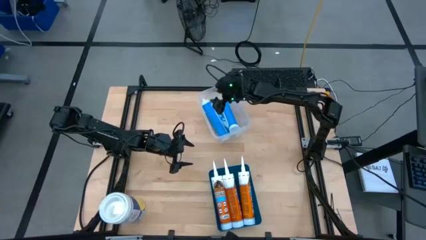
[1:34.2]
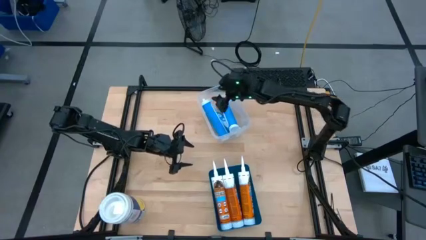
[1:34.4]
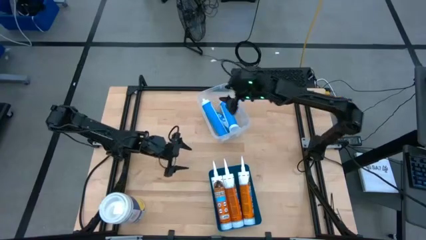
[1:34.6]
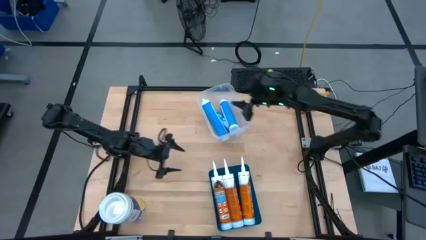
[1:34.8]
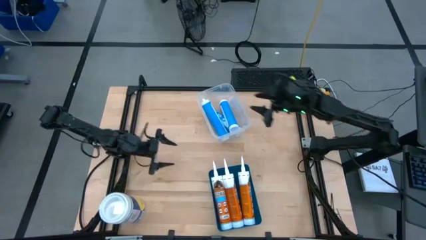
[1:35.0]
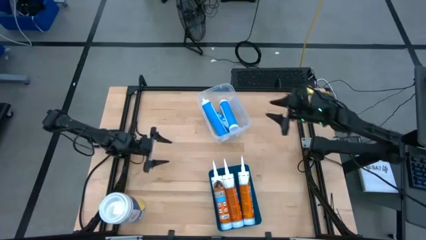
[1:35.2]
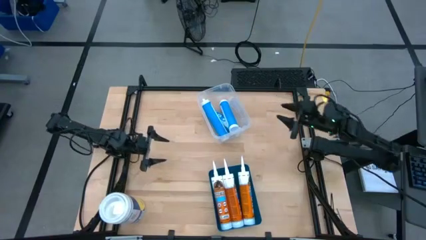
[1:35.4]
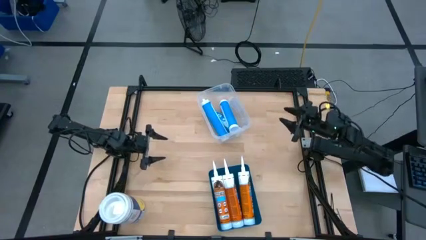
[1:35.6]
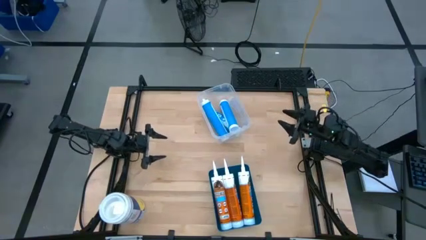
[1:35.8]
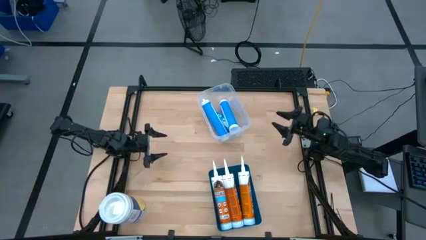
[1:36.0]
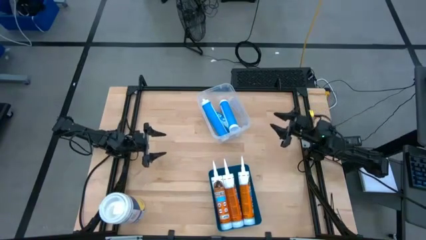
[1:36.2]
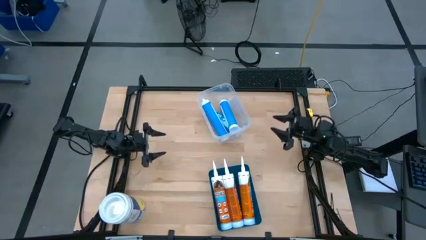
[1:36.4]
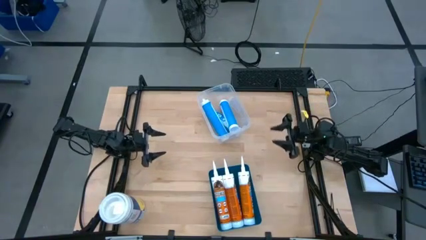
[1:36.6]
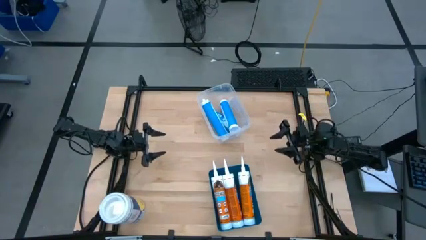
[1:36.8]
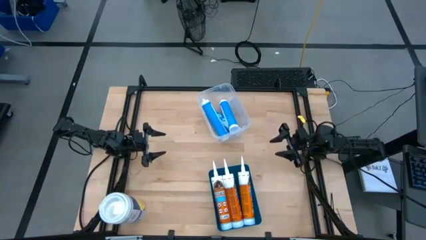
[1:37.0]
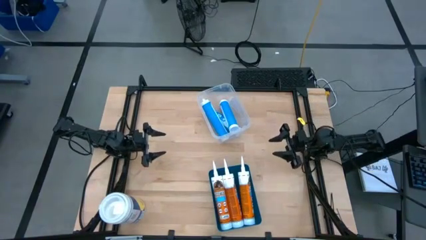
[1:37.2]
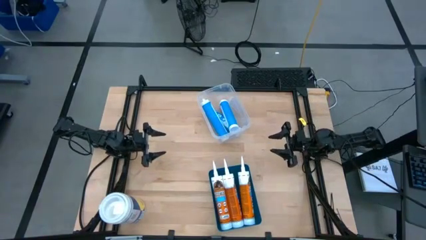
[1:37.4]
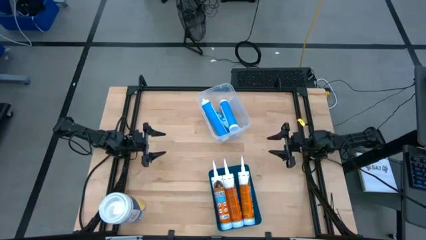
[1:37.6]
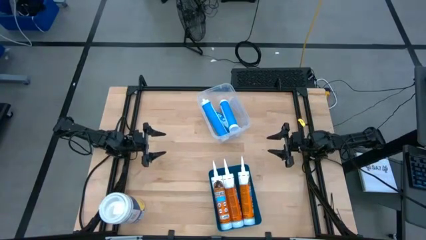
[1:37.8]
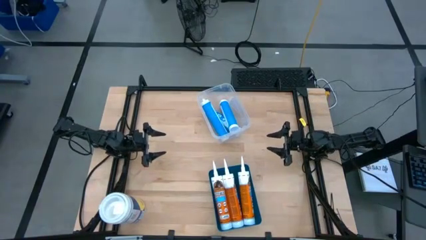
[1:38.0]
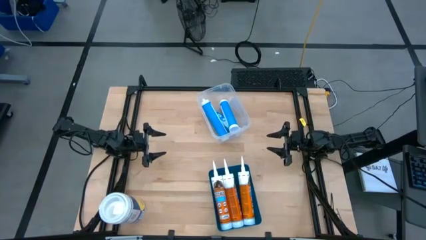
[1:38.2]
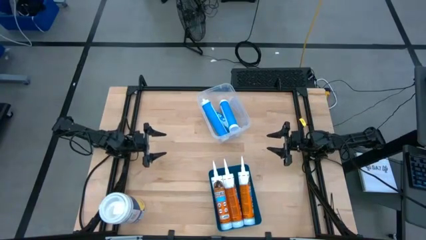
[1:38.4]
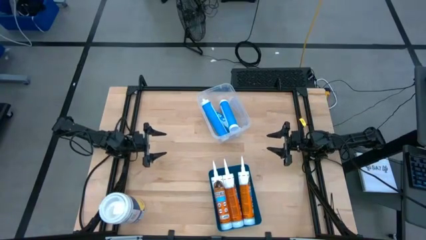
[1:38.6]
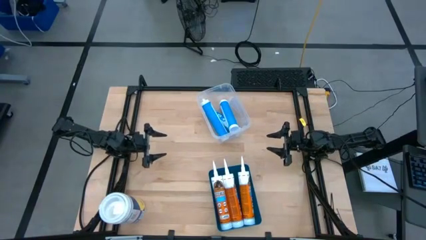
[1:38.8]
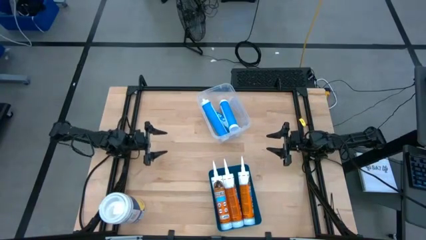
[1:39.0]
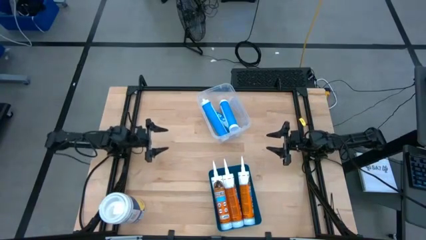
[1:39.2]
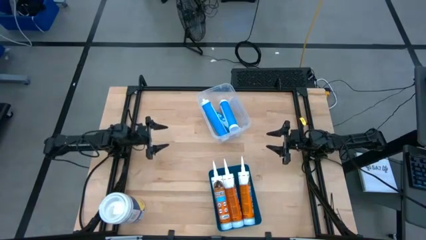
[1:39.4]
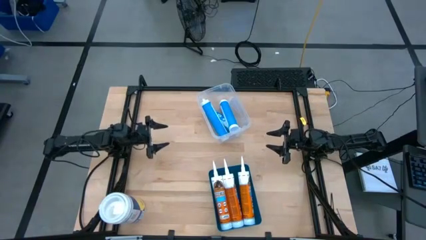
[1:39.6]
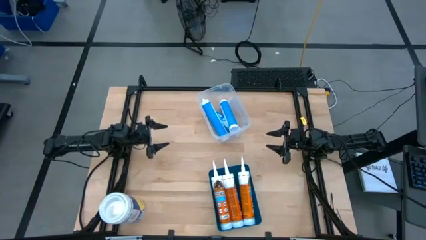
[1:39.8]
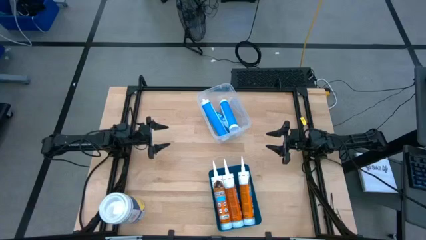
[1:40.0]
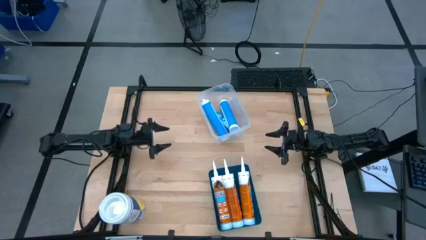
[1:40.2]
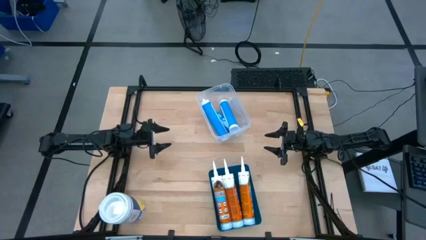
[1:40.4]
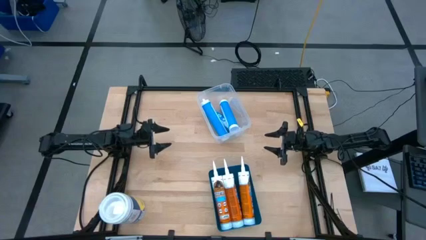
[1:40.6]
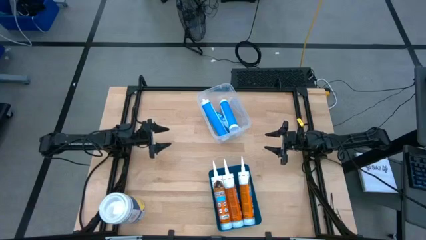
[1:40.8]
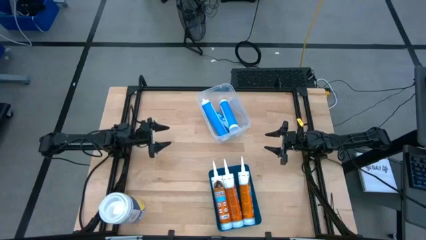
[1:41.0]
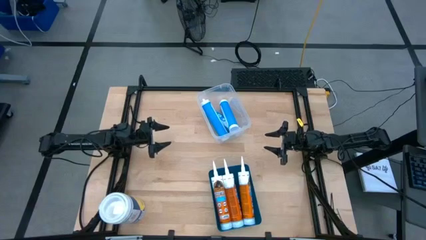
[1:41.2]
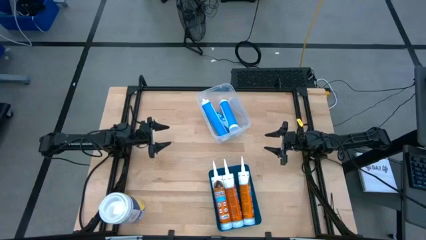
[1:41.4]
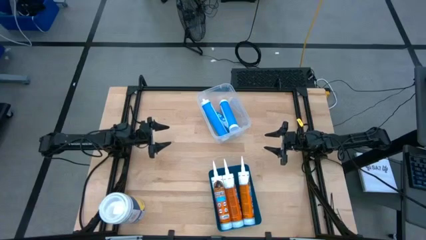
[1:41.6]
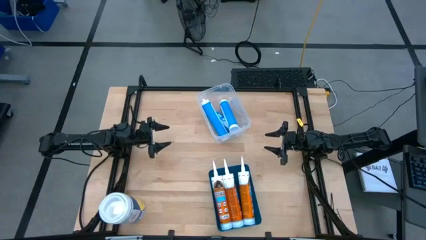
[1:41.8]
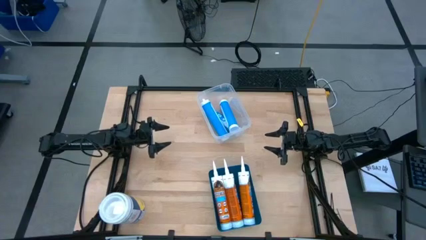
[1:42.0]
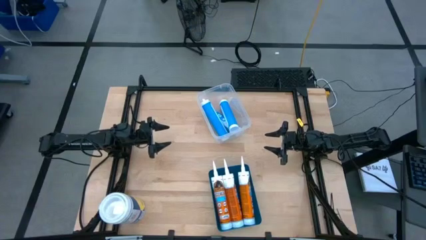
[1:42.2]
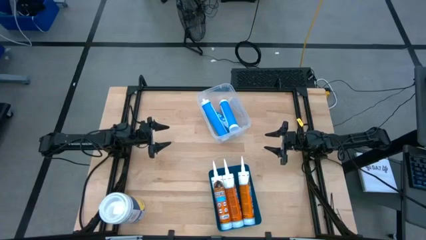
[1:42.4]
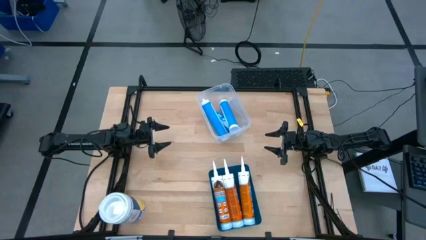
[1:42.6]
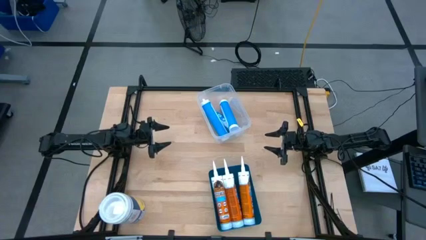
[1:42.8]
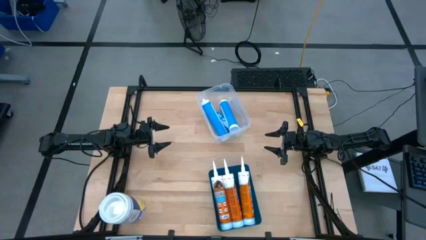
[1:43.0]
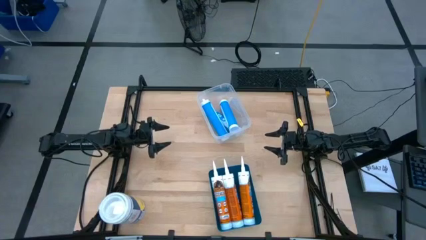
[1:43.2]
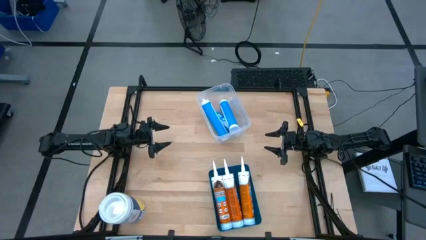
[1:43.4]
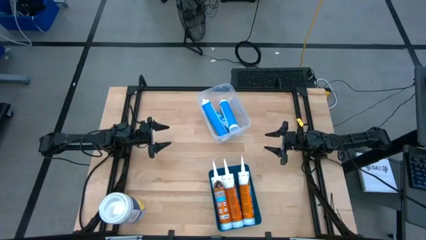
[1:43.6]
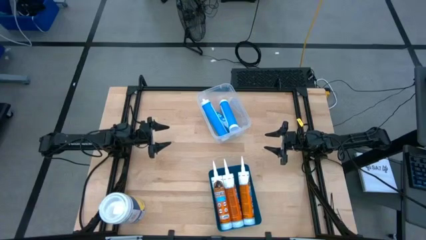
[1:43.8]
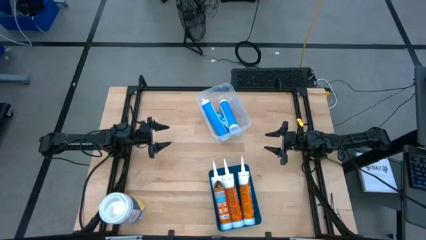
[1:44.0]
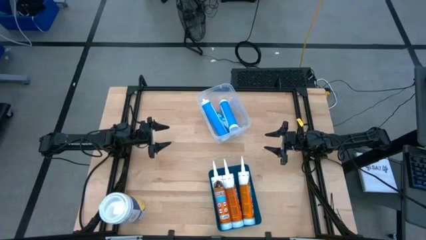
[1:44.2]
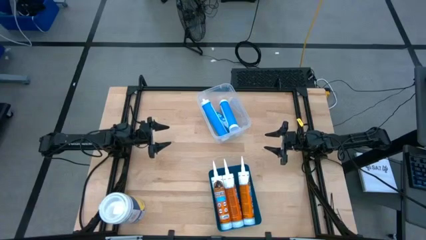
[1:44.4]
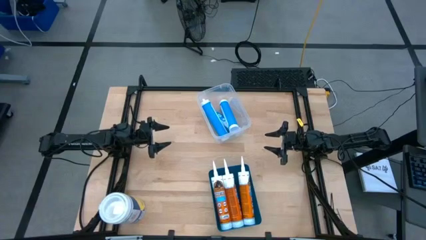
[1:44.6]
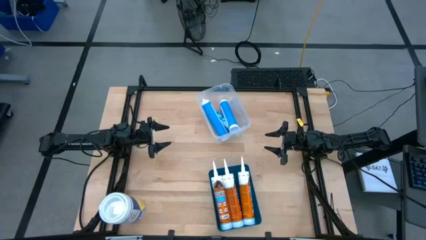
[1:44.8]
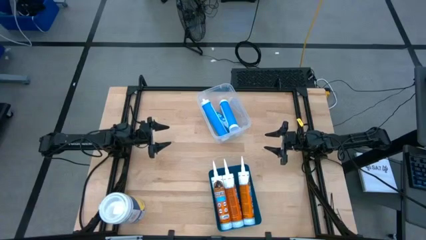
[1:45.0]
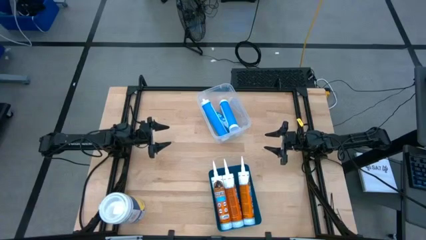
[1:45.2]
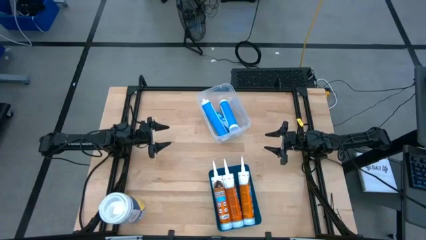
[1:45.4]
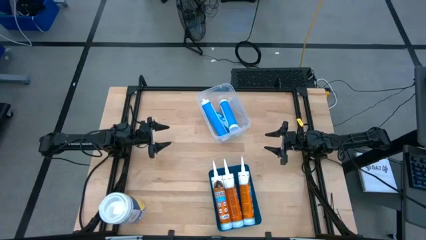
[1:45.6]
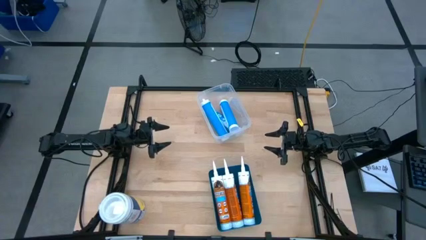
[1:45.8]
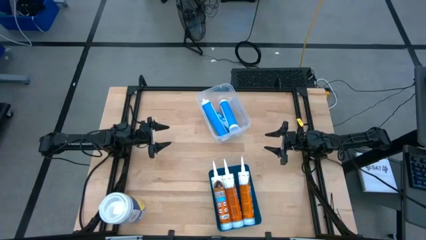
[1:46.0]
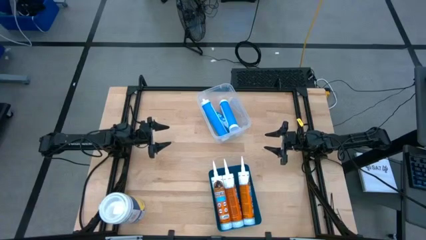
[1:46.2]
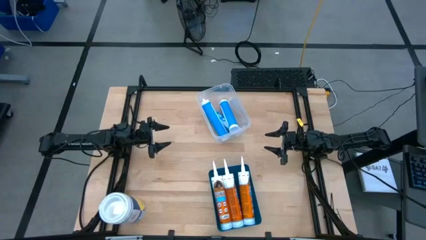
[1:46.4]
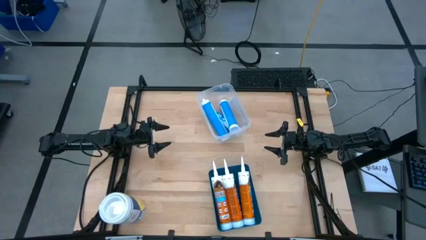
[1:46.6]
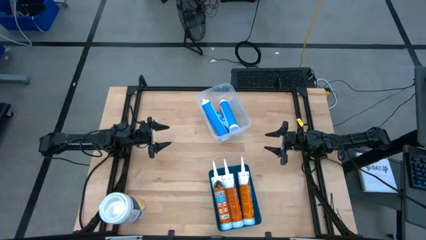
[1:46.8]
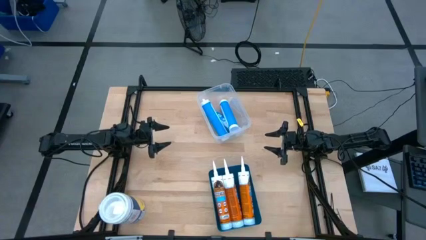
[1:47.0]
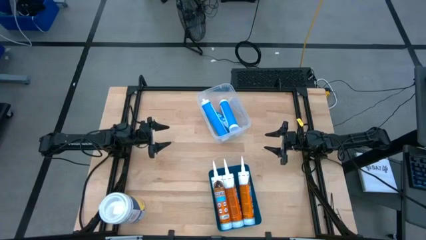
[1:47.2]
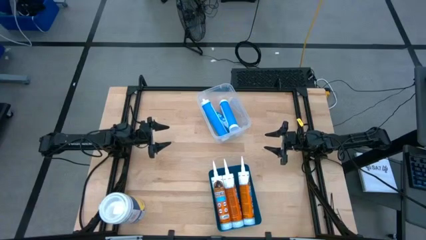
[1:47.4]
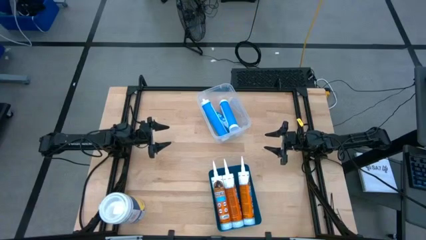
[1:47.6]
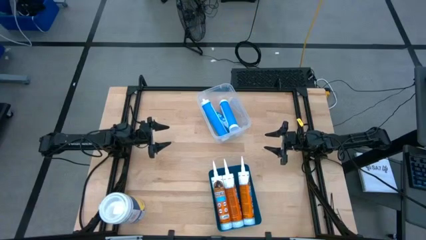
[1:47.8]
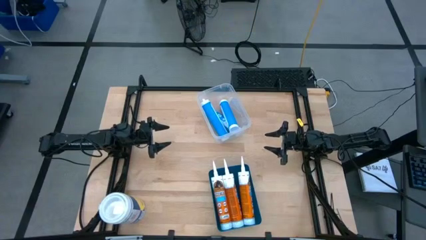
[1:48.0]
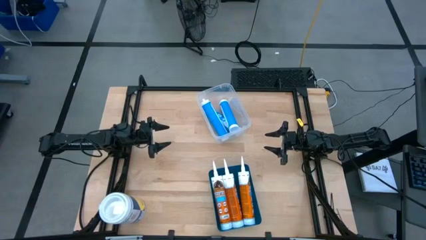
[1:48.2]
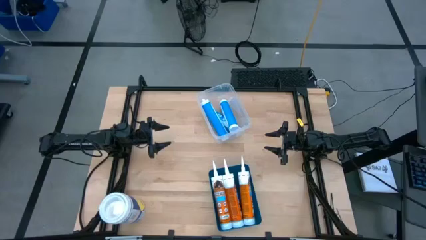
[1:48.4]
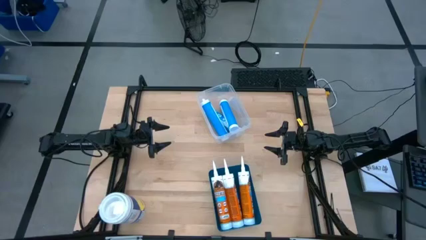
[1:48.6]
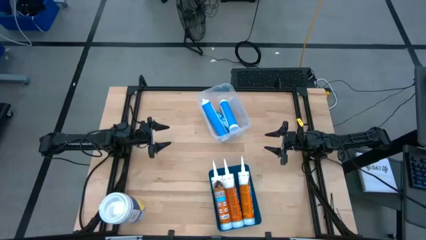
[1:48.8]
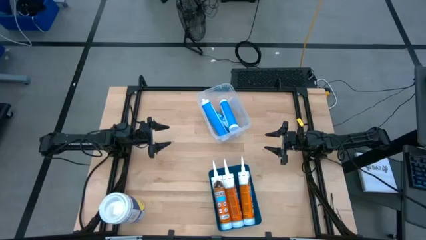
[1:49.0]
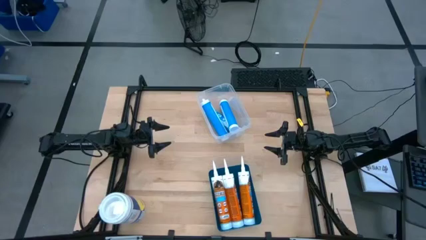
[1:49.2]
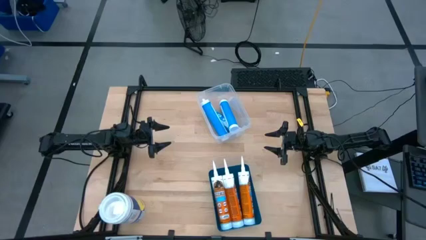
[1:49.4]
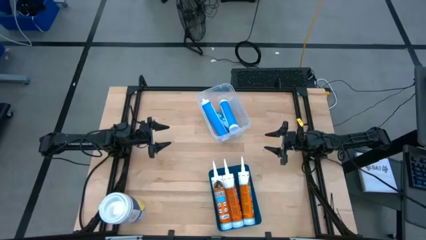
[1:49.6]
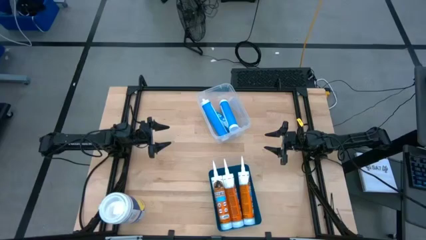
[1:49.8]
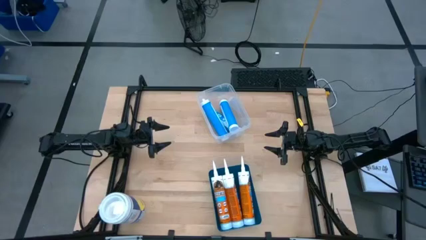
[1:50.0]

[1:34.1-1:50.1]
Task: Sort silicone sealant tubes
Return to Home Position
